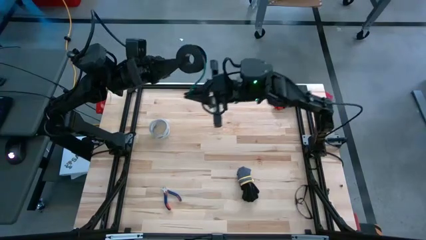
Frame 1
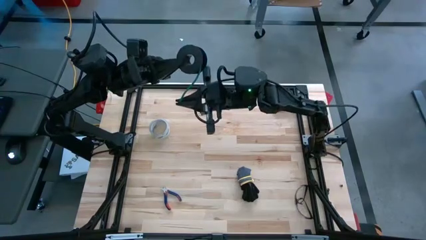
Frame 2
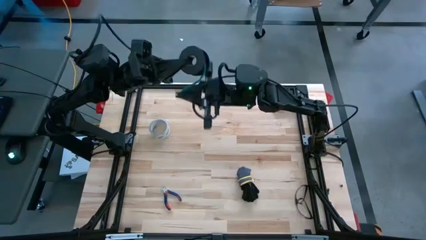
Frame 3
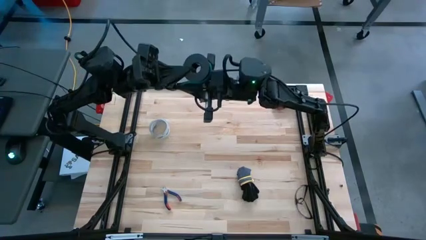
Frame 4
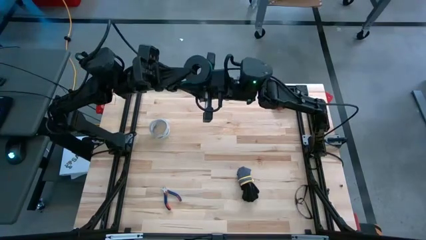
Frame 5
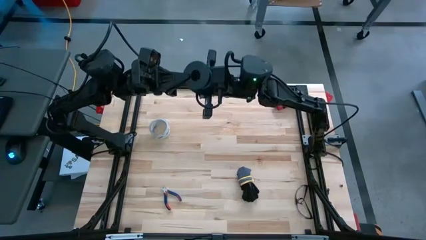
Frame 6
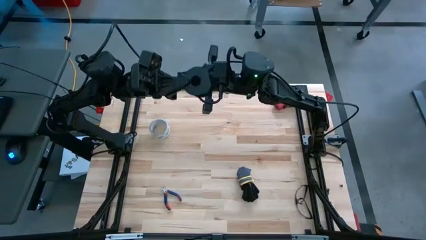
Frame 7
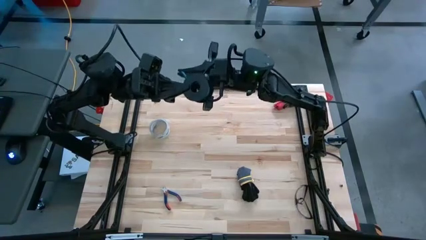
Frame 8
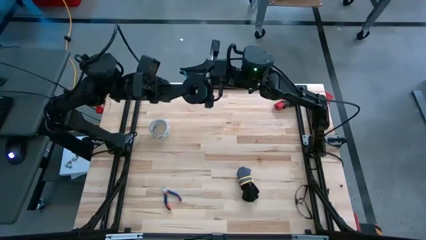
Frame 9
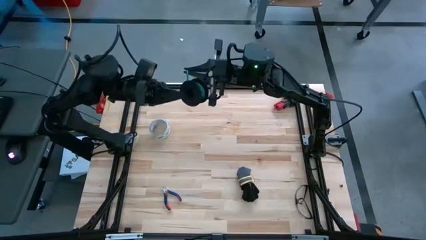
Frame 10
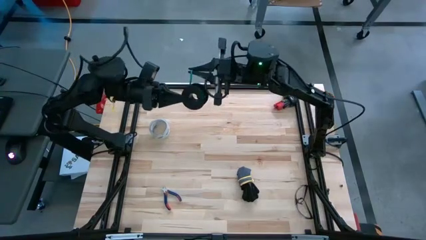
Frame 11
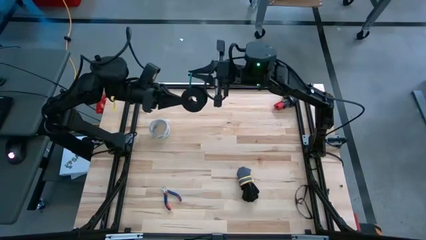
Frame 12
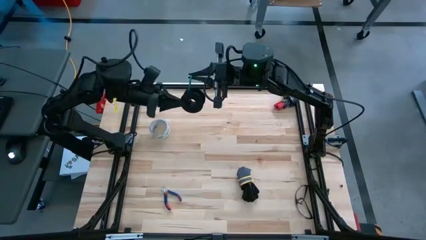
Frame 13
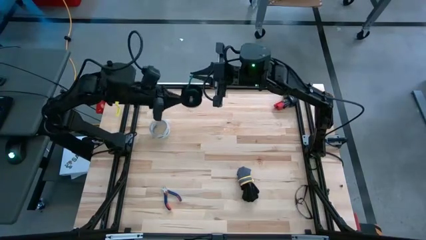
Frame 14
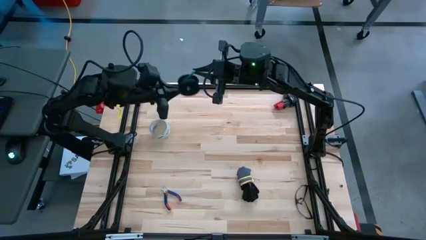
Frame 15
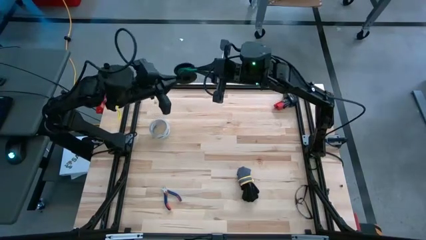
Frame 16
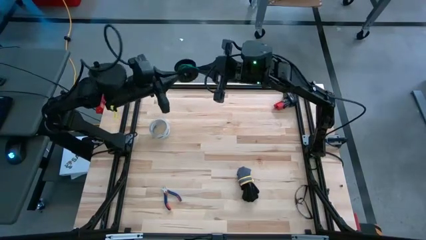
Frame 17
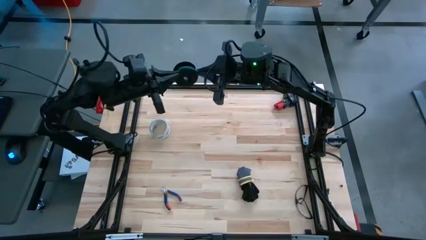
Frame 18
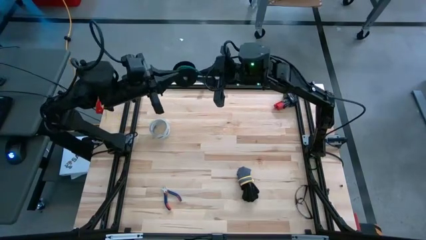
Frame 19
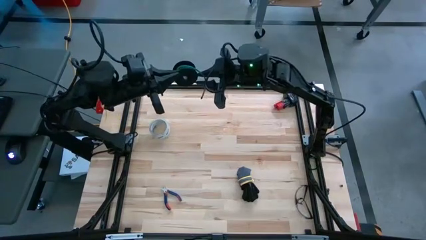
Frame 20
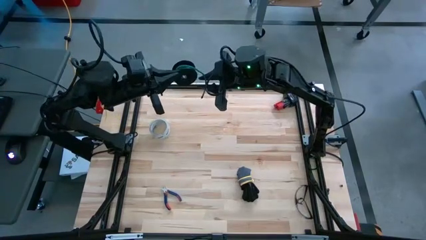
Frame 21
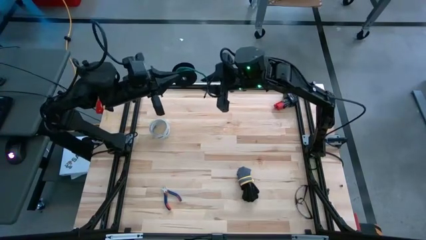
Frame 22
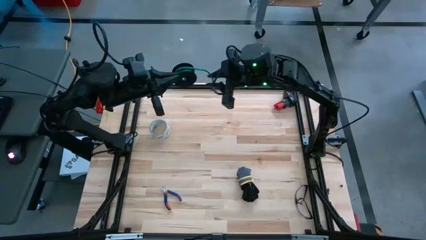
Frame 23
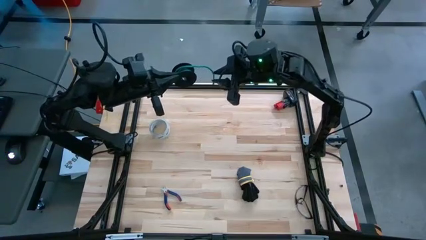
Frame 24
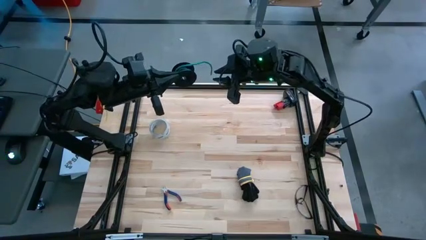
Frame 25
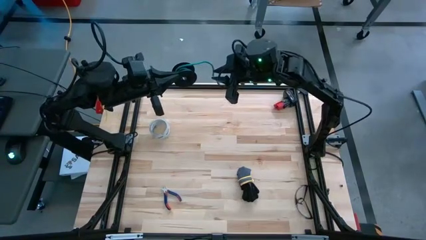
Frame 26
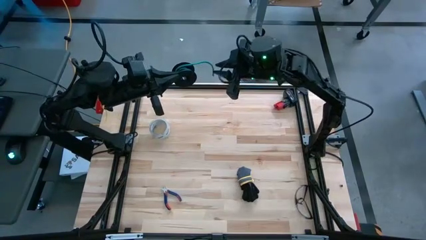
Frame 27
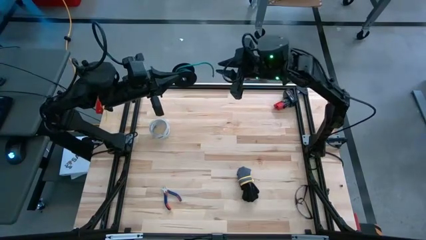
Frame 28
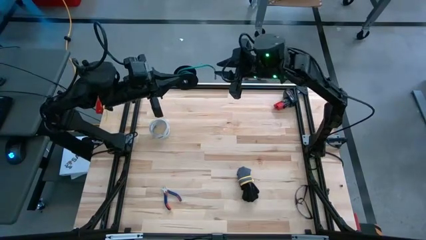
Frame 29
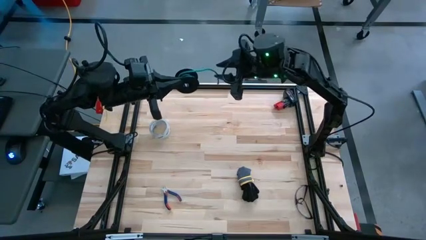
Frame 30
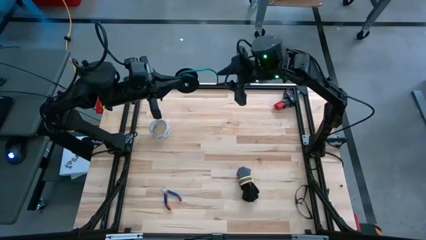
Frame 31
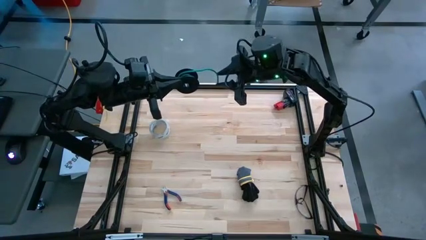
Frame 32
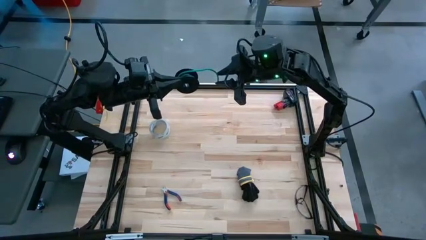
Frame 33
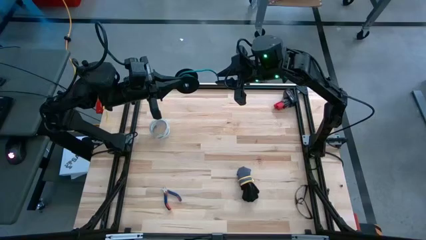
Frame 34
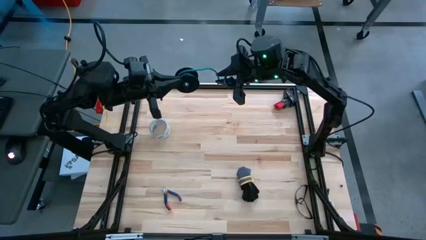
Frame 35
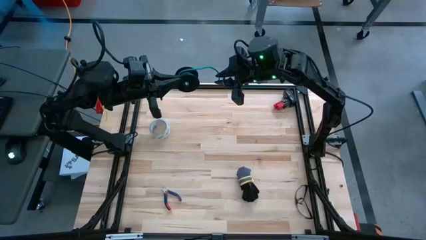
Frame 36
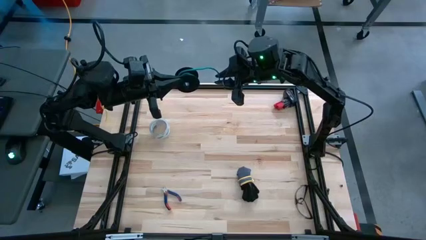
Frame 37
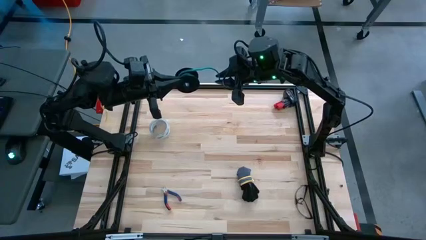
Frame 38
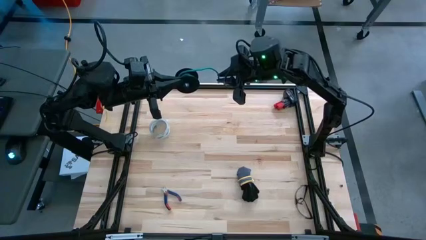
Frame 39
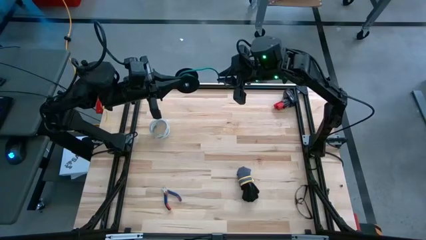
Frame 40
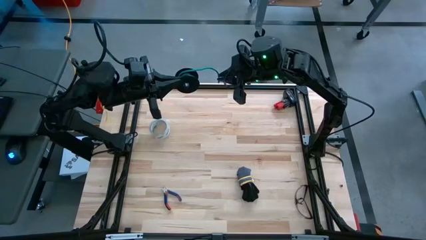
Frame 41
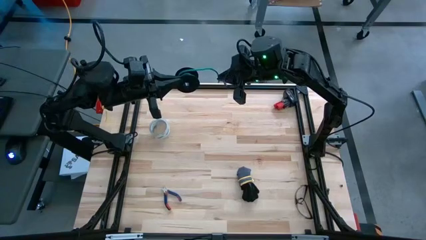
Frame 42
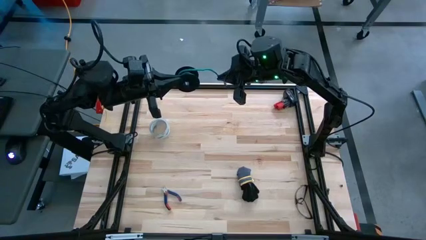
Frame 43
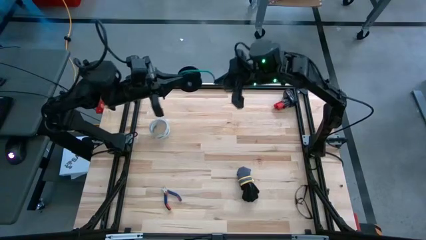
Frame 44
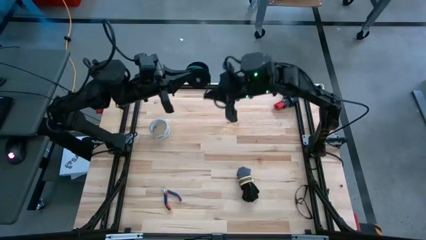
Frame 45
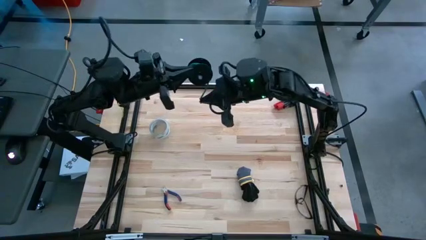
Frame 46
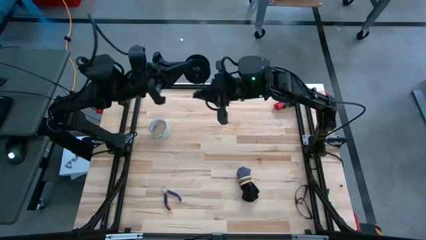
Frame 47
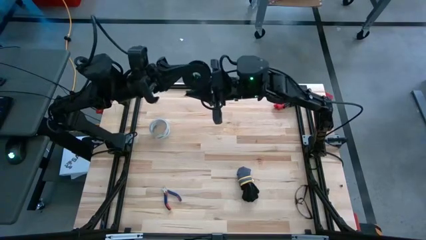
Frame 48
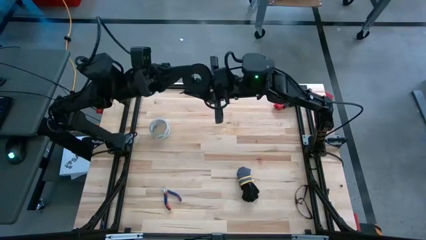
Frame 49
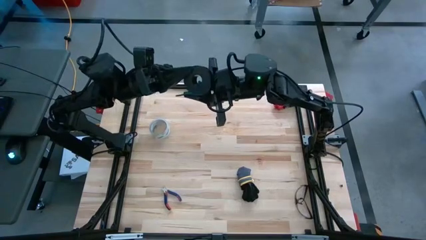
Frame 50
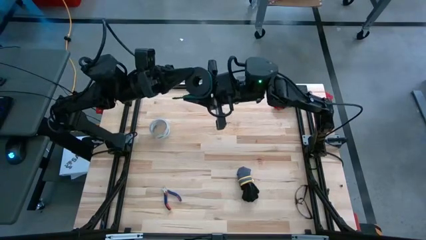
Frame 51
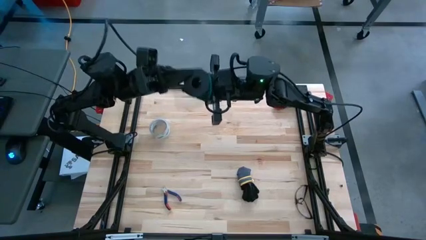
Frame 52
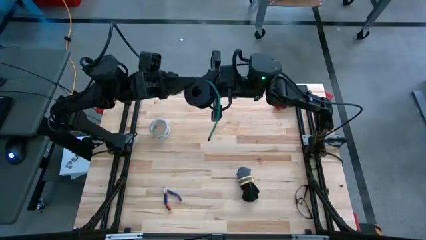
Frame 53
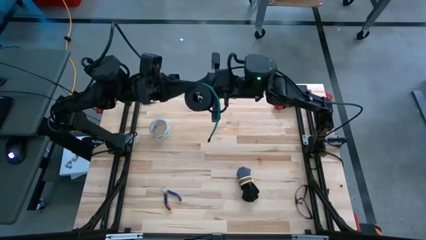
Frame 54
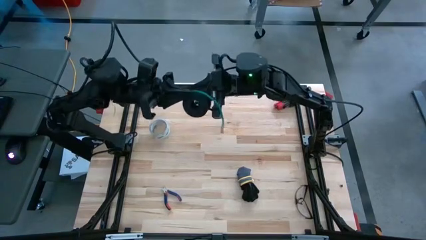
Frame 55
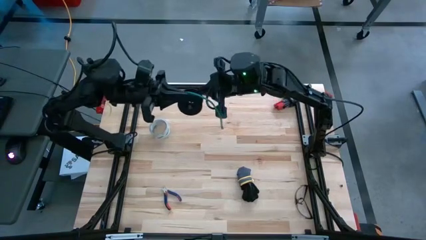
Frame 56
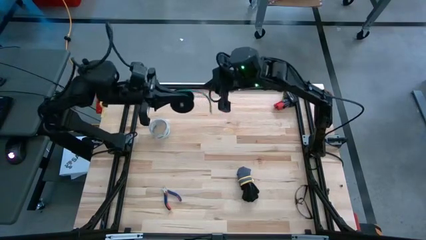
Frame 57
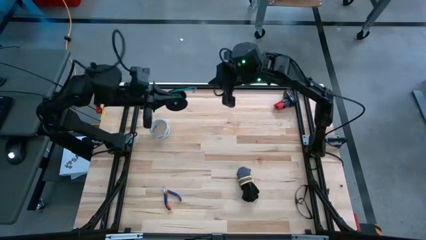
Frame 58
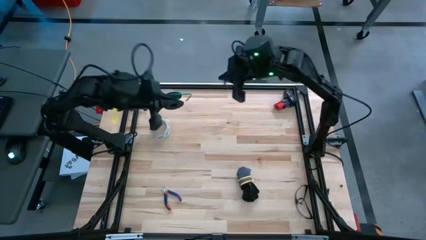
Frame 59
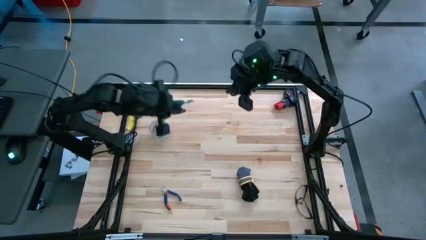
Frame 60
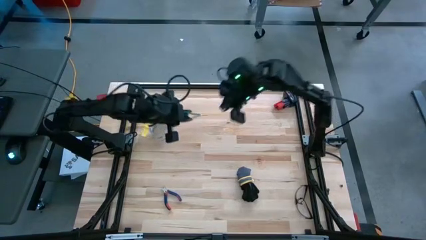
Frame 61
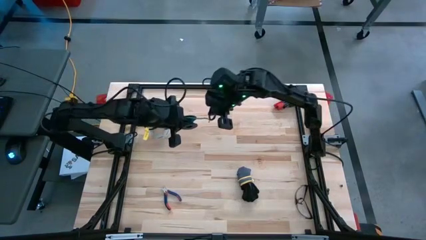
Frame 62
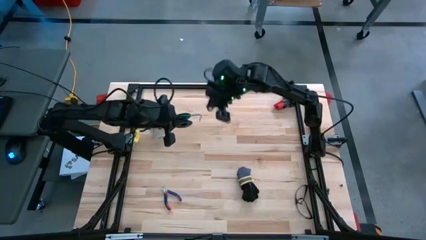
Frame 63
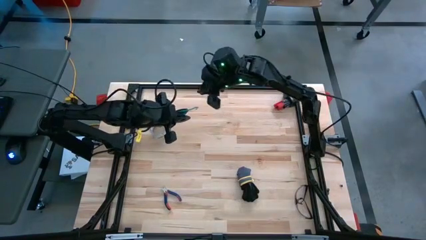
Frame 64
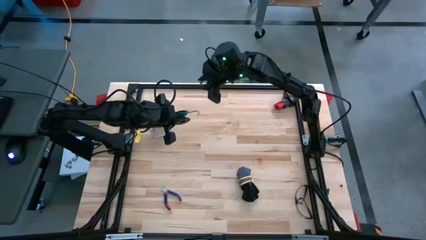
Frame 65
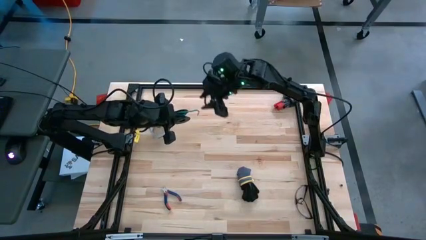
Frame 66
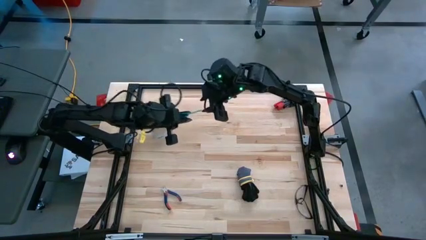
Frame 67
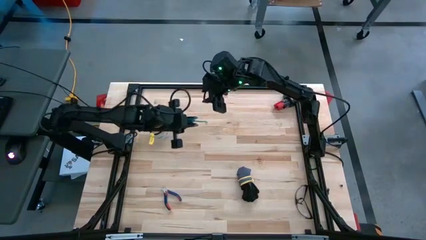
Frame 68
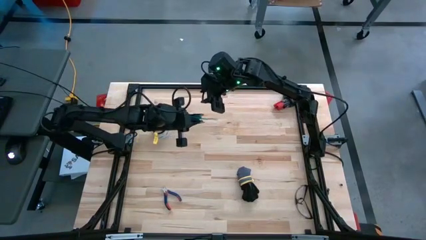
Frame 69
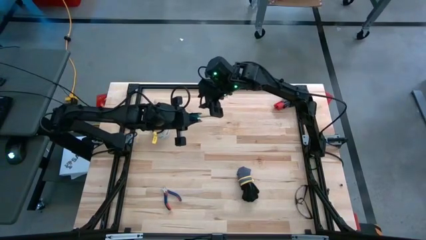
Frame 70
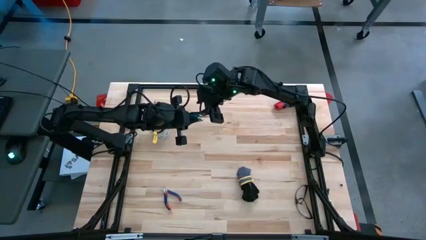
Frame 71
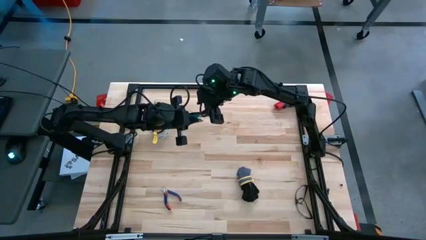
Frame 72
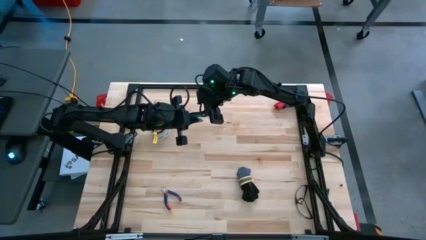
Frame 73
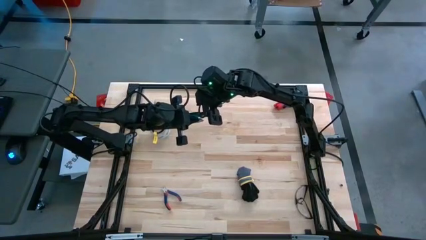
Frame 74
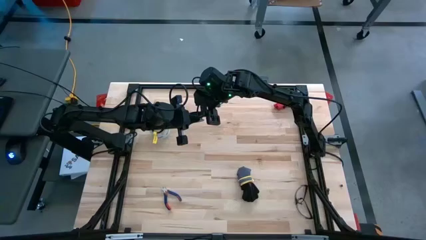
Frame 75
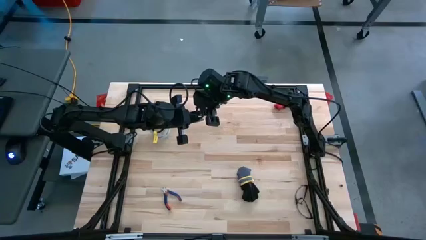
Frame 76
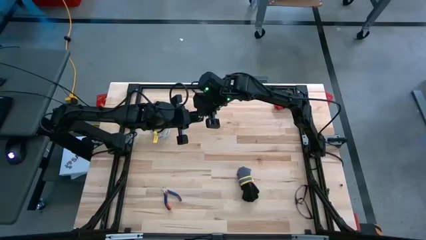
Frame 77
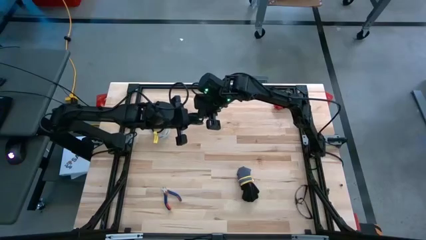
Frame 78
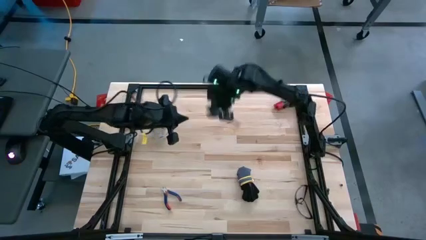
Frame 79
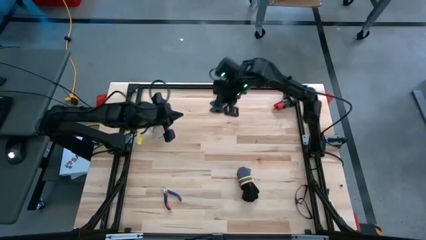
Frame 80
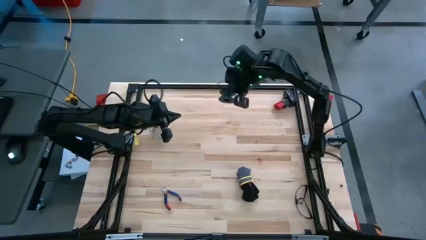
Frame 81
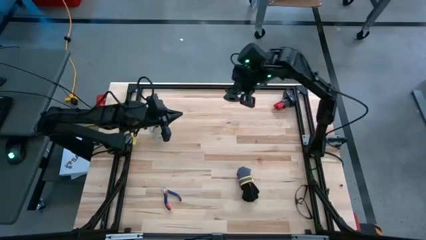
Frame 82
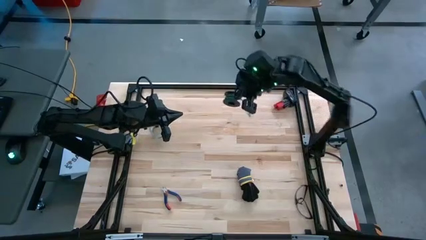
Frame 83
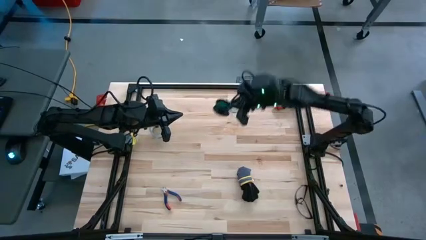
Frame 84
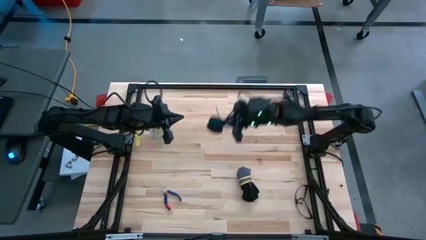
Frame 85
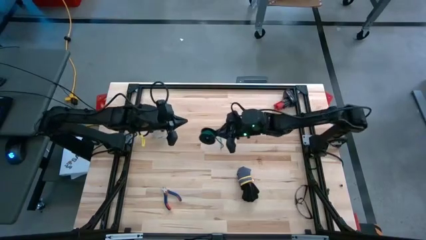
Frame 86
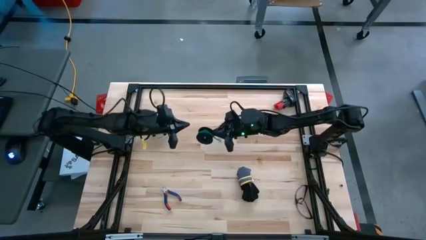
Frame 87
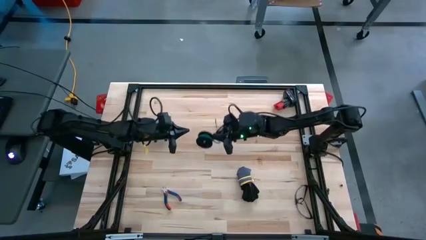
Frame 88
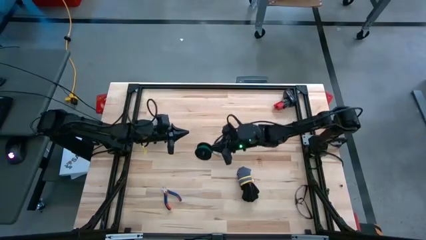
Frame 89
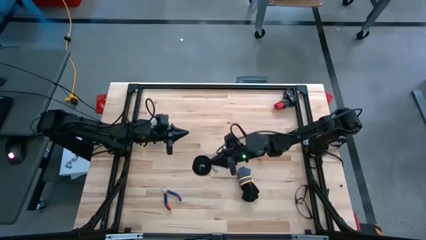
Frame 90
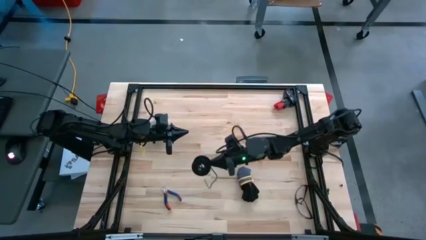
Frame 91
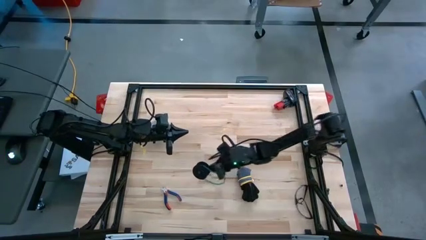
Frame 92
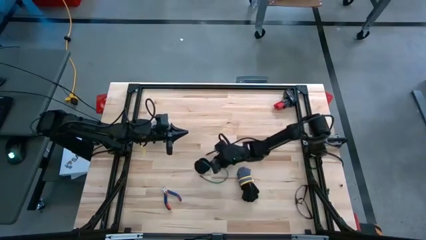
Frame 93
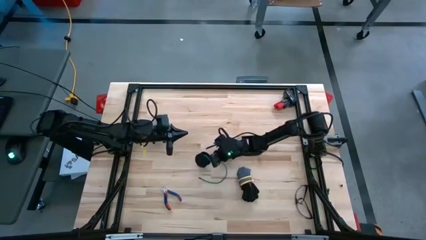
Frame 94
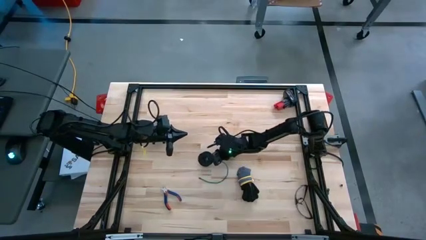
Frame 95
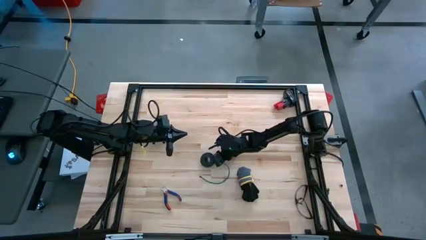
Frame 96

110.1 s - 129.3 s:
Task: Coil cords
Coil the green wire on the spool
